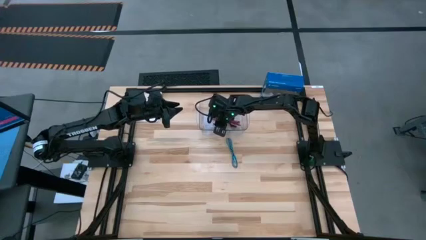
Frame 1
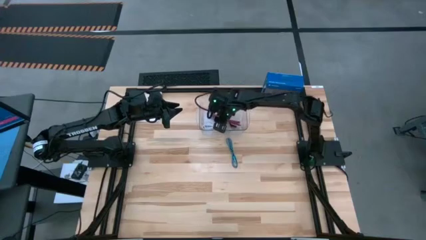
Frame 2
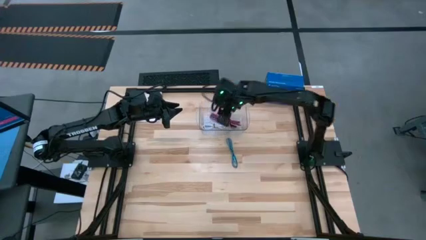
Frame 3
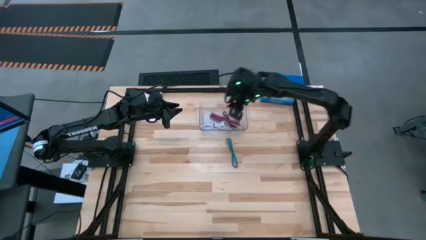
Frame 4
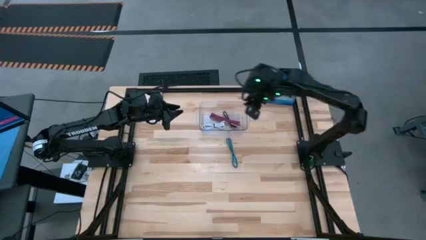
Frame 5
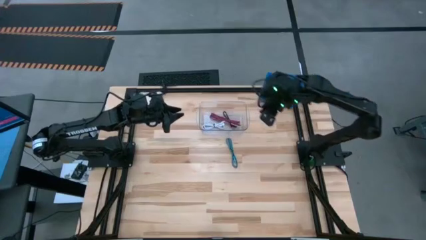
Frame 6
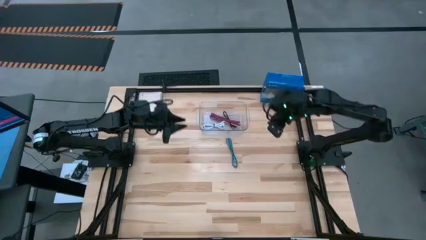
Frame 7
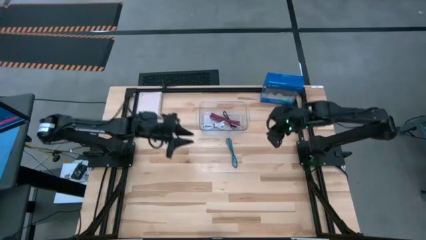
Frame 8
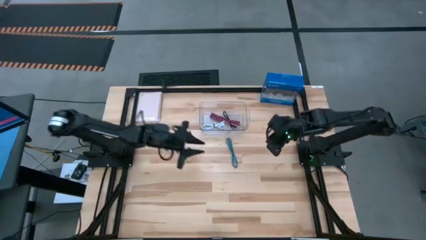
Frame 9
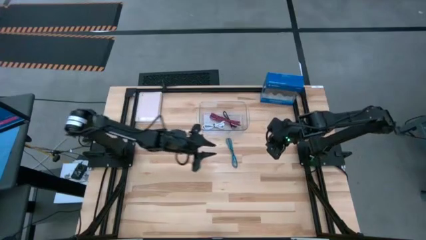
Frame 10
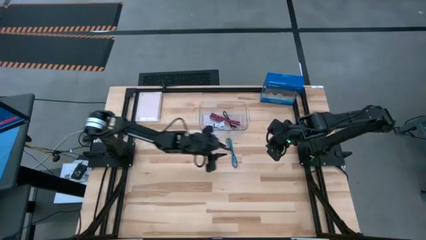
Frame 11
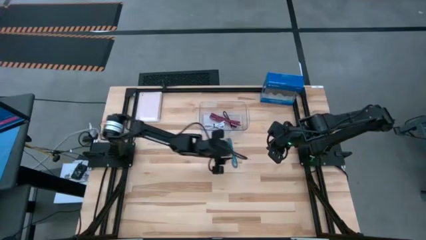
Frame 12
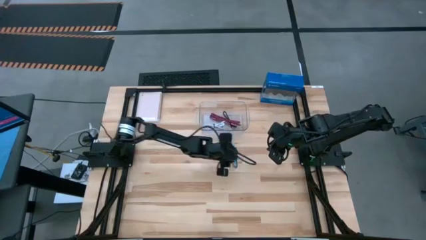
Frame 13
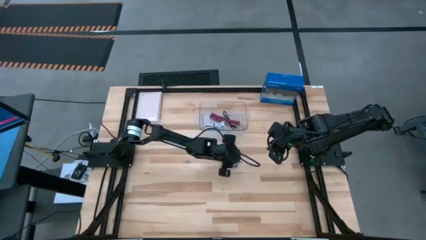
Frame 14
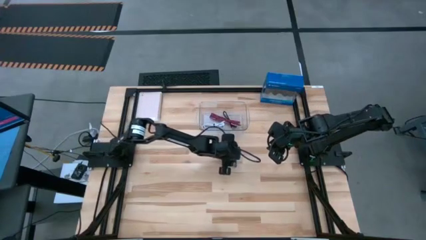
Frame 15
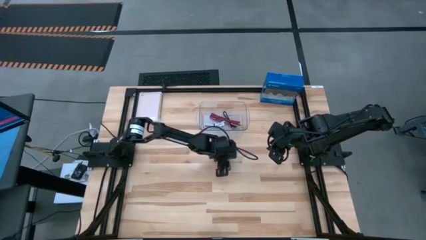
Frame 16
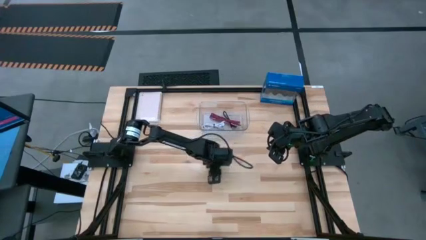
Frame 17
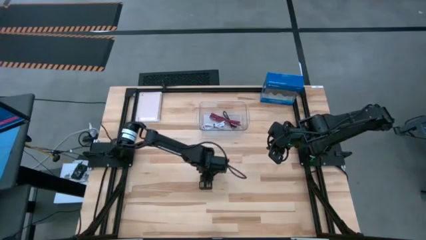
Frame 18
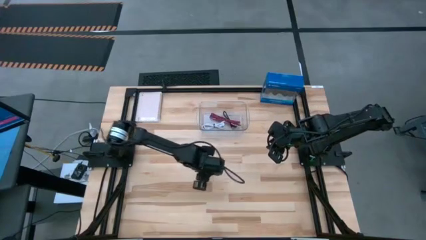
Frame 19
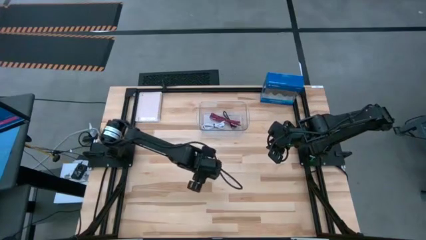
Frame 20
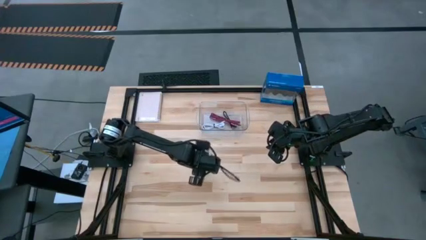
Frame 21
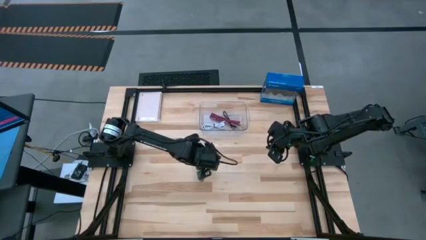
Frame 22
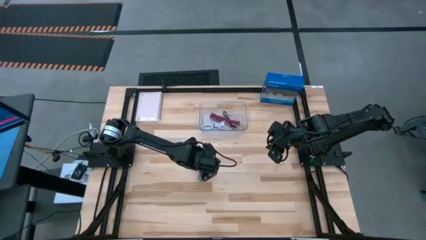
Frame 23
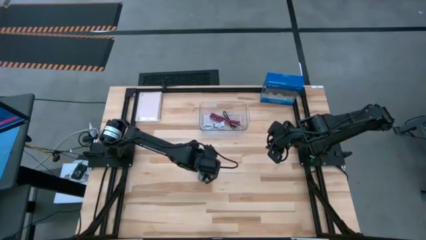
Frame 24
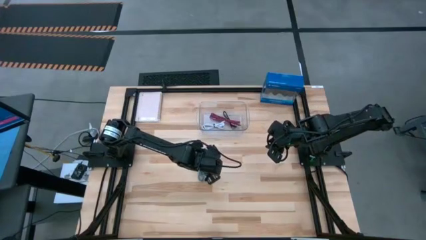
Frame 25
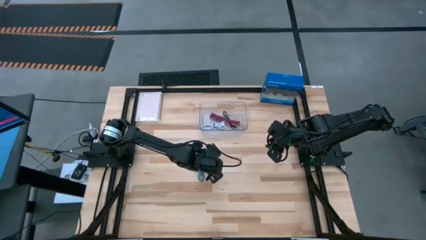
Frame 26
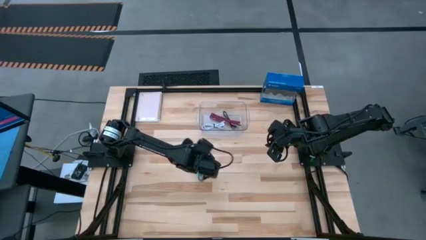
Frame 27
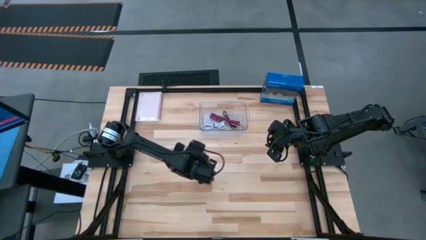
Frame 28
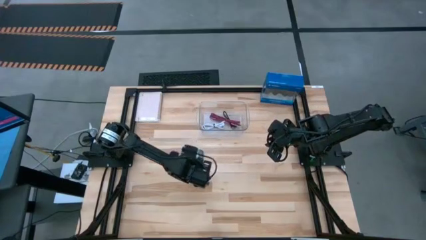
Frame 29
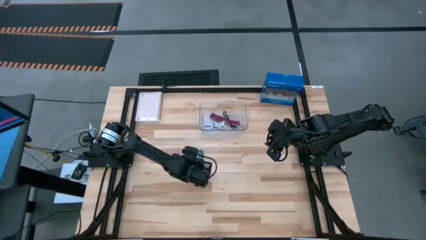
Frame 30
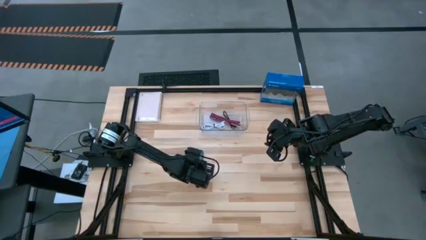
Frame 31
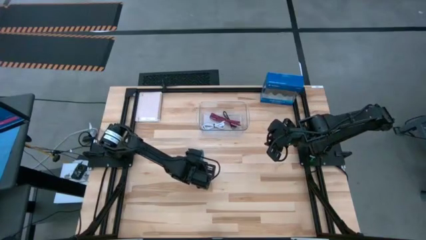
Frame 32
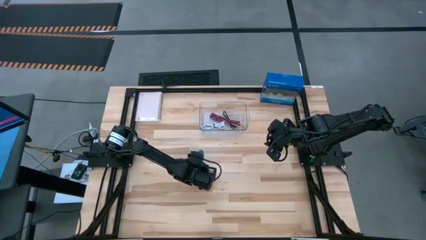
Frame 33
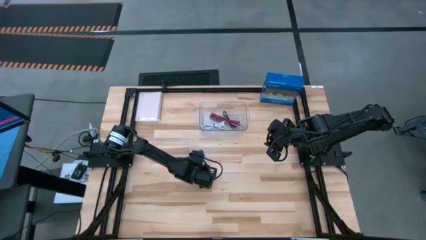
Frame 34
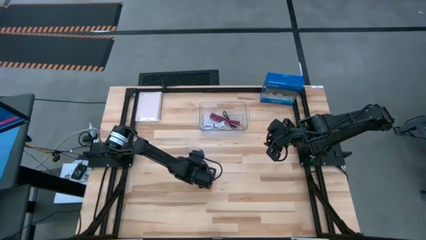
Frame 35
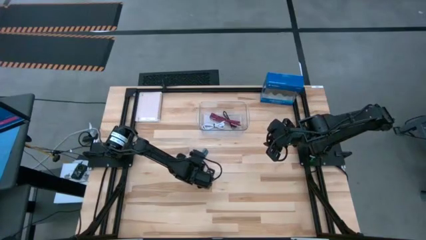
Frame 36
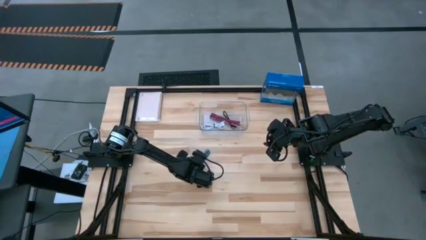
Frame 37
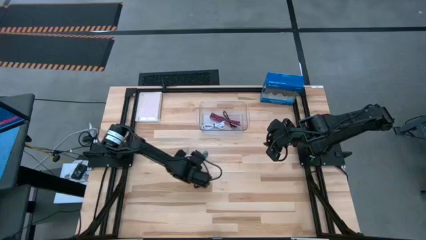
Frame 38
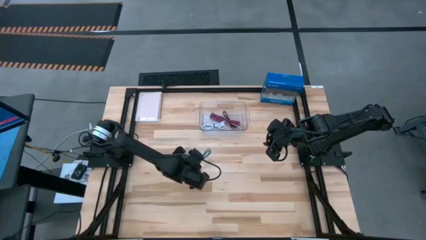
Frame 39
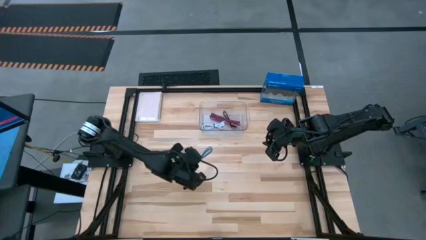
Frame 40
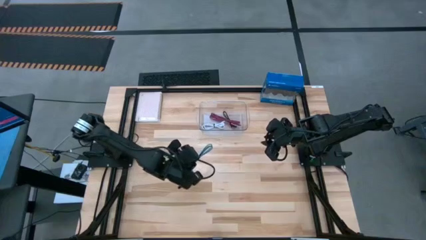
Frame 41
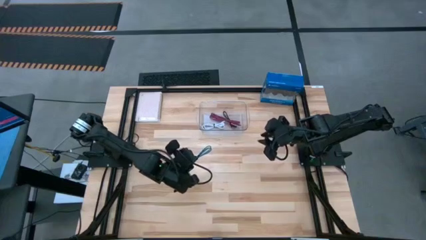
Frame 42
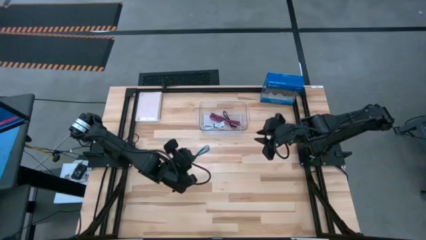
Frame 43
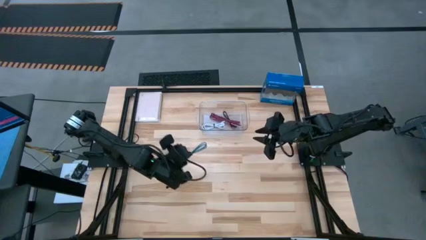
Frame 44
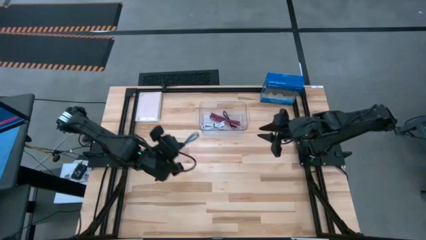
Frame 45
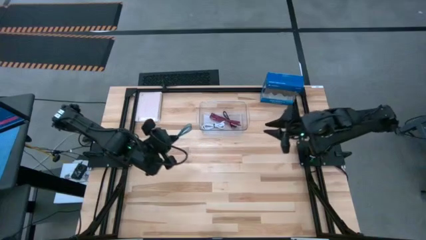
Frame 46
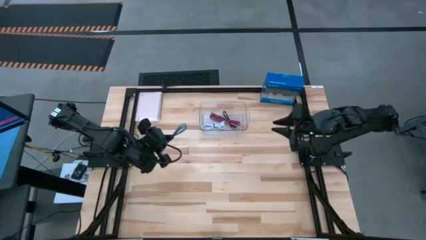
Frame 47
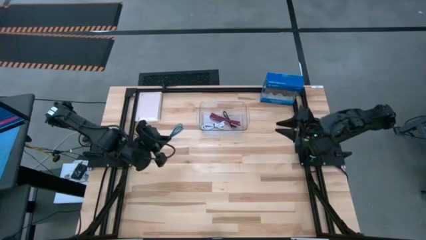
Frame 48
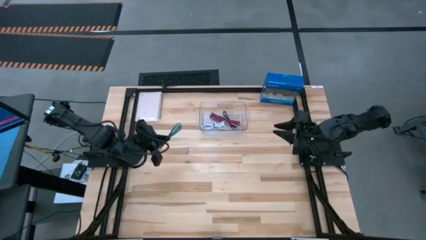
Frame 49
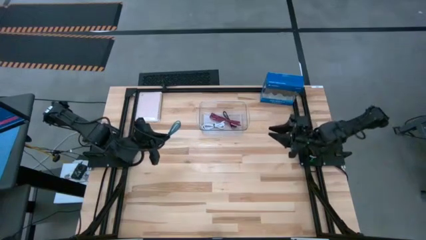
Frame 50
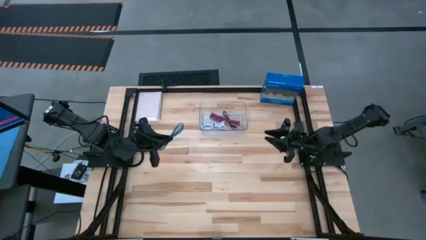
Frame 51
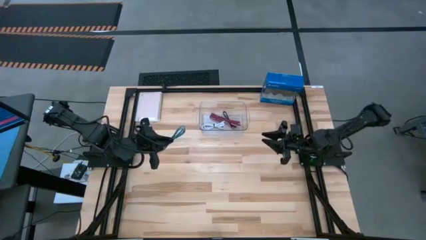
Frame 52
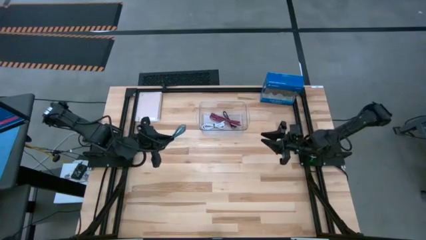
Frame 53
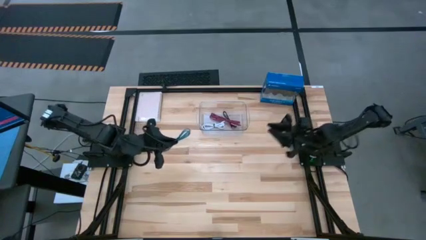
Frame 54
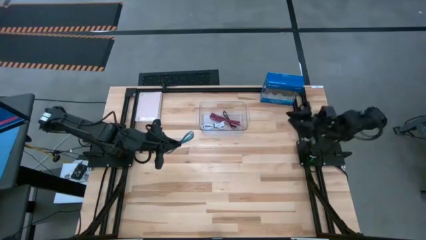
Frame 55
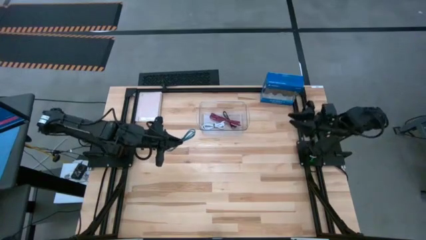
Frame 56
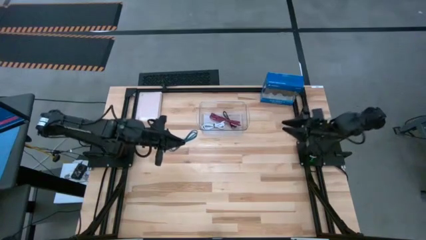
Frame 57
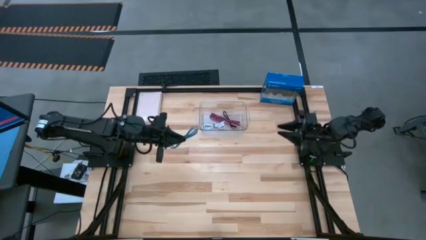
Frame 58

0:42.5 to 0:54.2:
Task: Pick and place USB-C Cables
Put the blue charger cable into the transparent bin

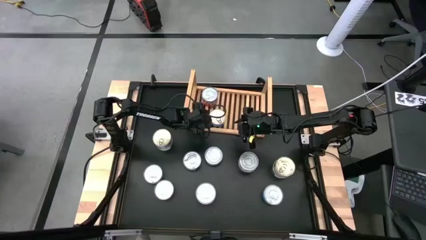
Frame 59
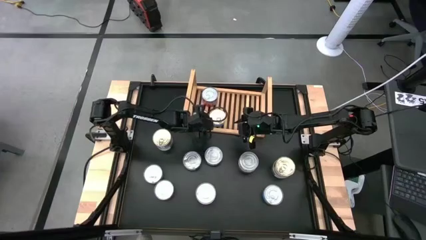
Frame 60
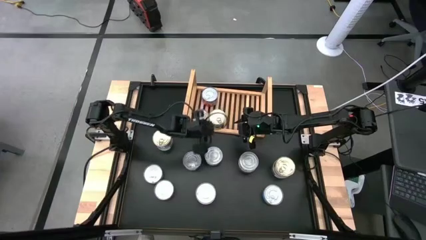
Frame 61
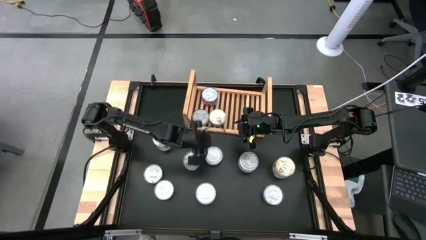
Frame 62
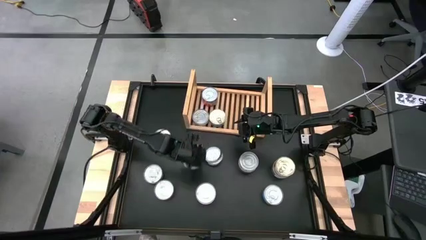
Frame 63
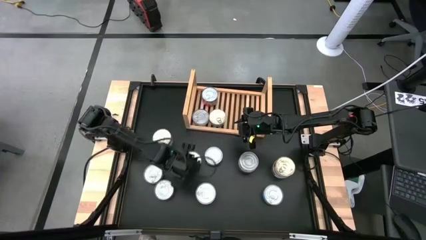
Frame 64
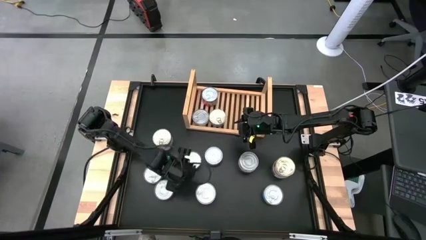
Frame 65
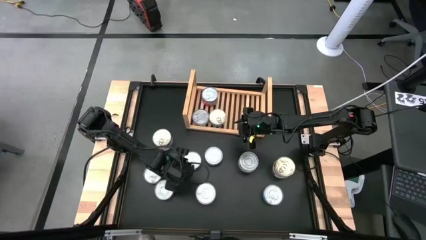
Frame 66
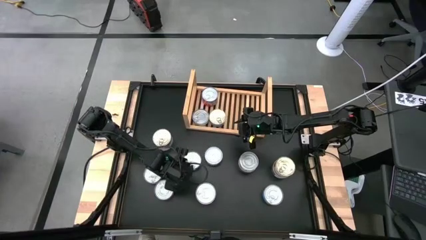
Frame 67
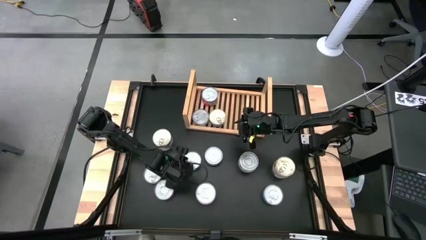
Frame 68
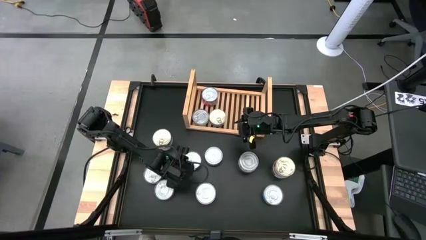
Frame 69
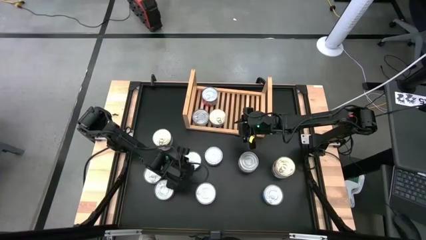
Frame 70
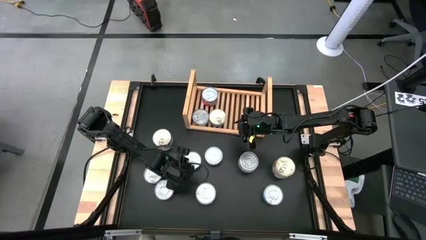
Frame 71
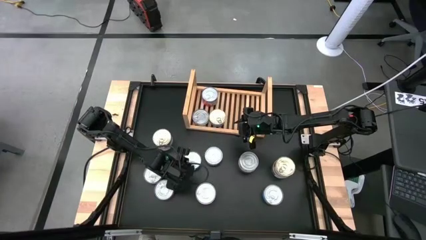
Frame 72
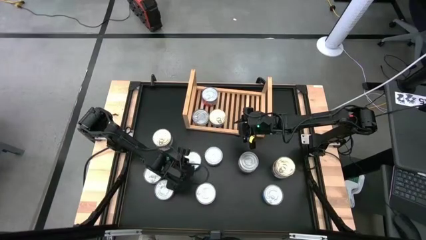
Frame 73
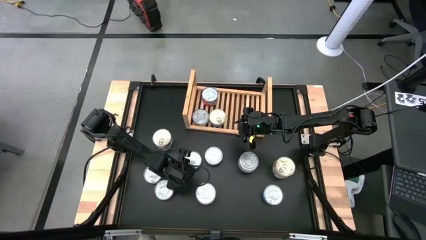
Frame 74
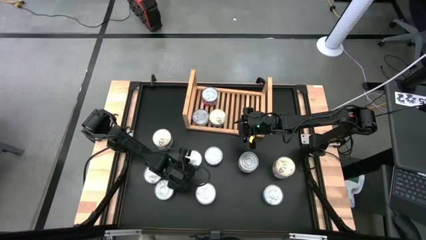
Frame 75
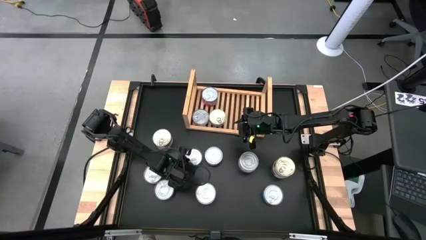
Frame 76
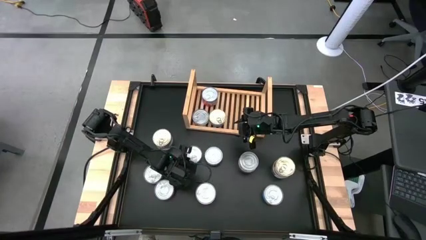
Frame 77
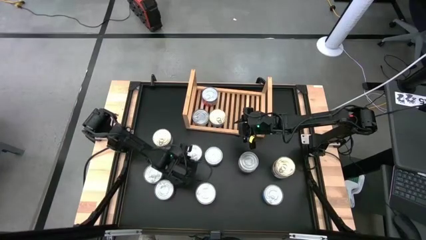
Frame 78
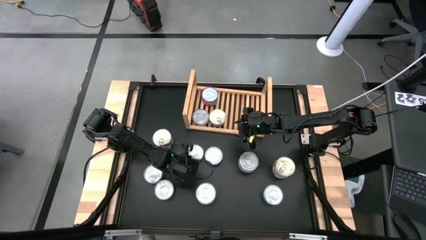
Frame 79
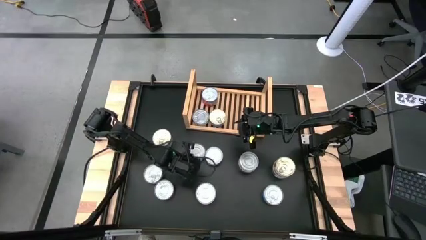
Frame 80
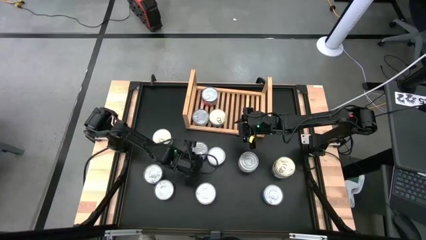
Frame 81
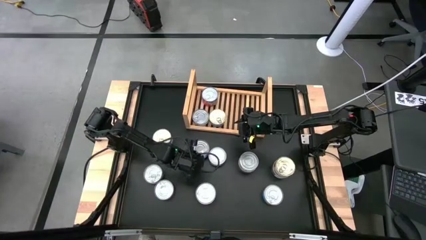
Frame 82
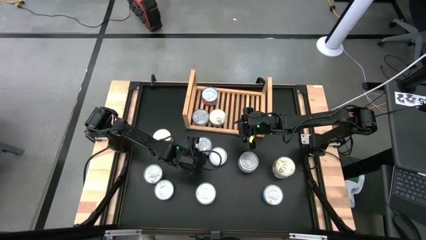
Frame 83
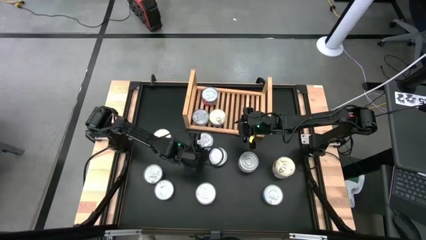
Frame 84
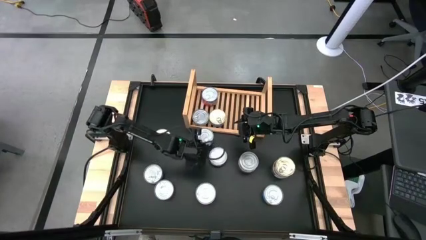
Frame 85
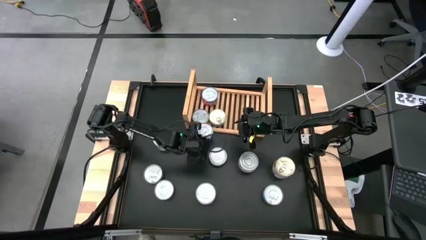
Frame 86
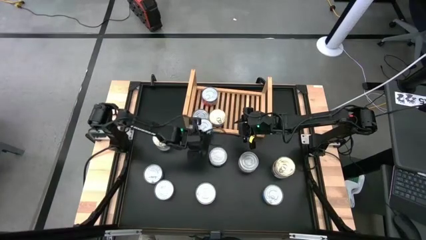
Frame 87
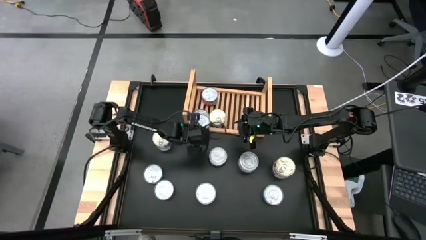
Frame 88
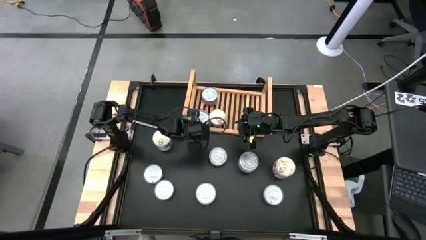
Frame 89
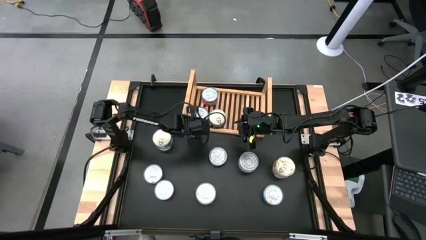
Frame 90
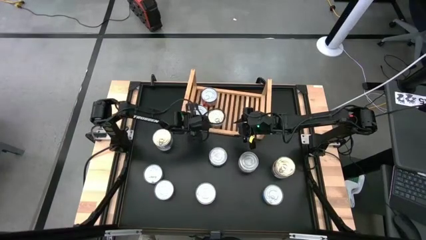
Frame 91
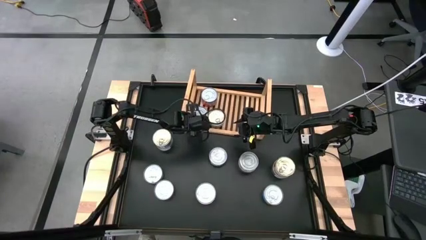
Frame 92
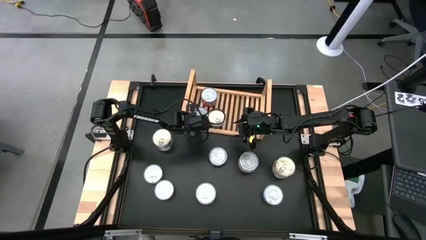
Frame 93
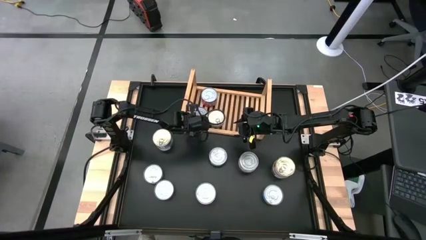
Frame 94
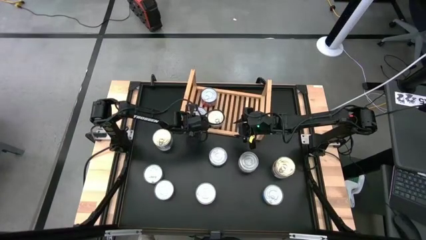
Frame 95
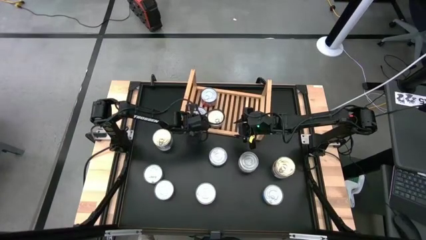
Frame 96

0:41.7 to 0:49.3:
Task: Stack canned seafood by type on shelf
Stack the light blue tuna can on top of the other light blue tuna can on the shelf
